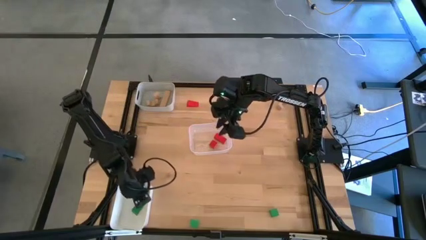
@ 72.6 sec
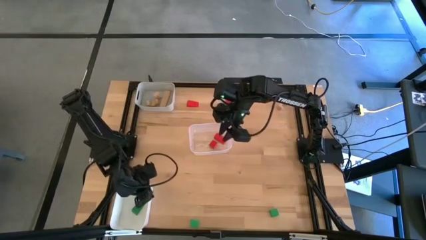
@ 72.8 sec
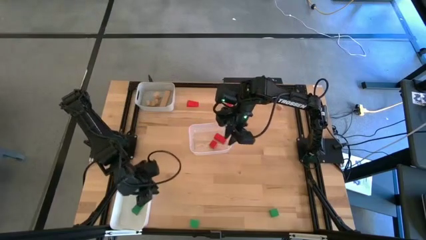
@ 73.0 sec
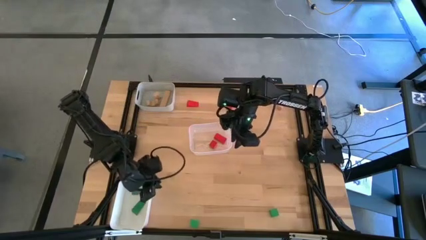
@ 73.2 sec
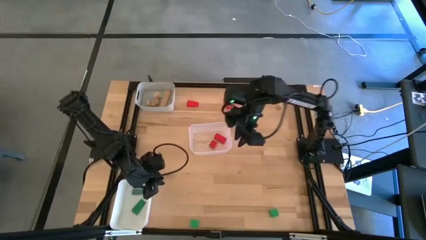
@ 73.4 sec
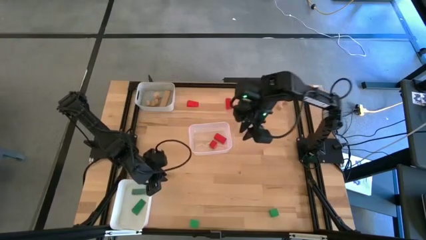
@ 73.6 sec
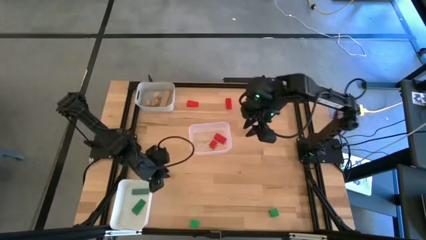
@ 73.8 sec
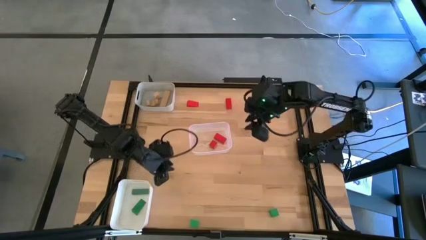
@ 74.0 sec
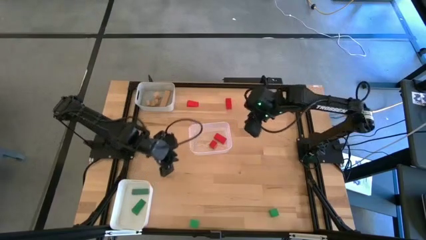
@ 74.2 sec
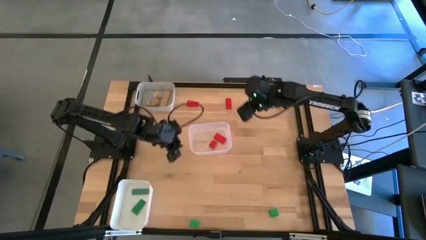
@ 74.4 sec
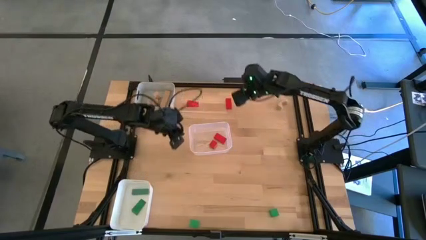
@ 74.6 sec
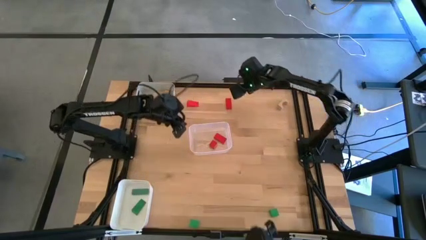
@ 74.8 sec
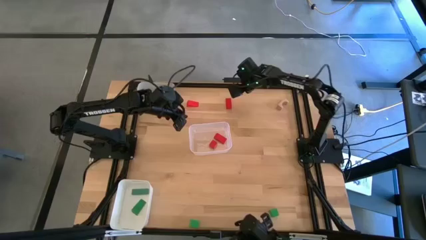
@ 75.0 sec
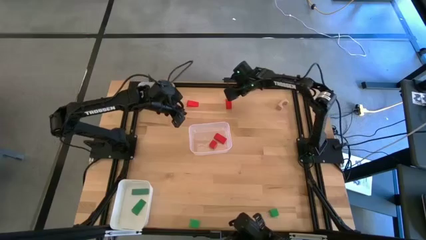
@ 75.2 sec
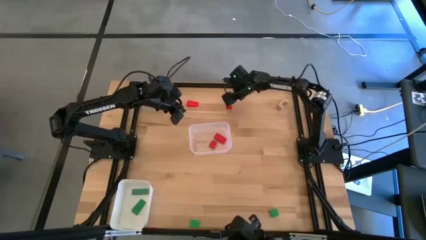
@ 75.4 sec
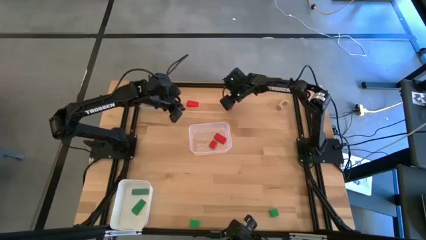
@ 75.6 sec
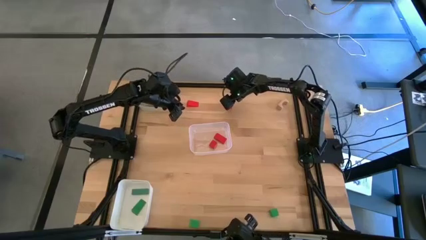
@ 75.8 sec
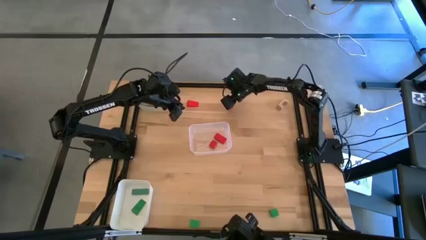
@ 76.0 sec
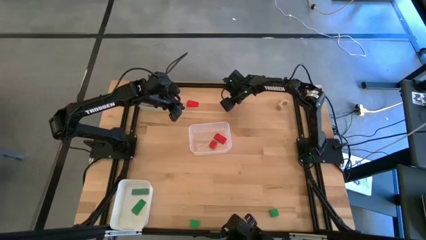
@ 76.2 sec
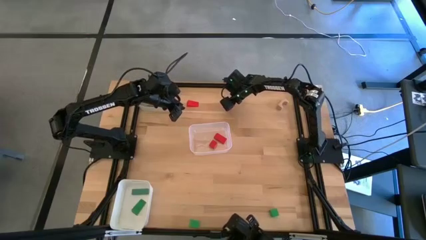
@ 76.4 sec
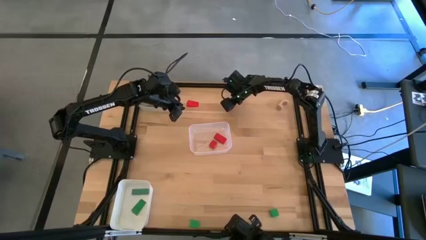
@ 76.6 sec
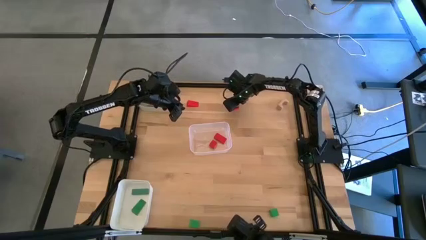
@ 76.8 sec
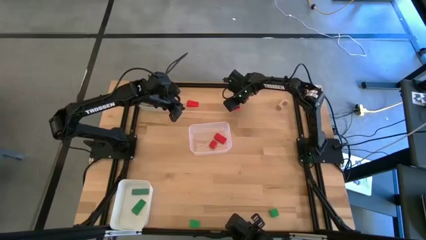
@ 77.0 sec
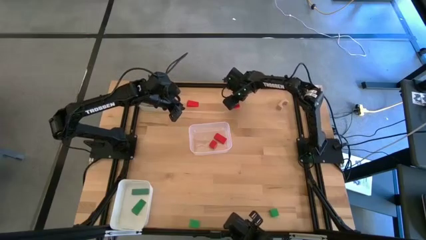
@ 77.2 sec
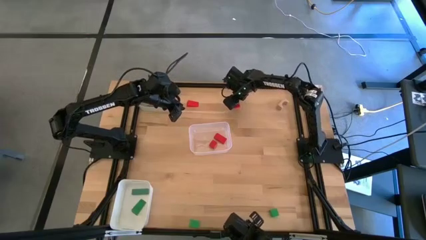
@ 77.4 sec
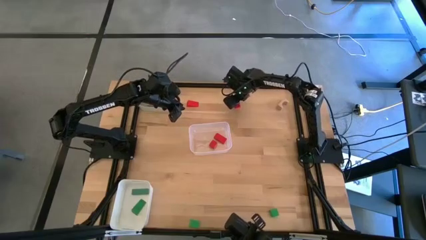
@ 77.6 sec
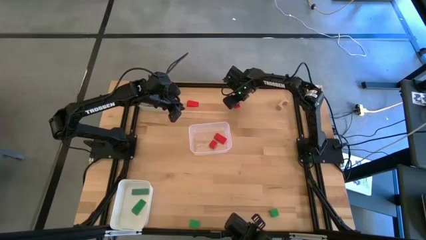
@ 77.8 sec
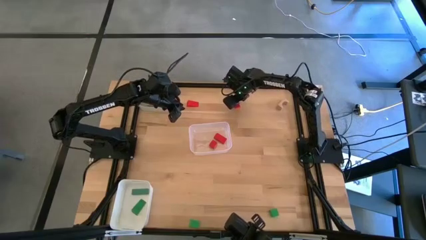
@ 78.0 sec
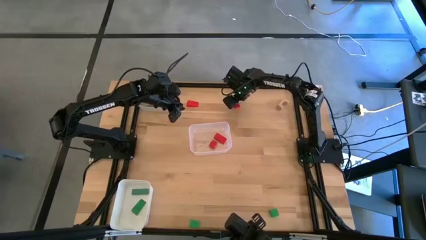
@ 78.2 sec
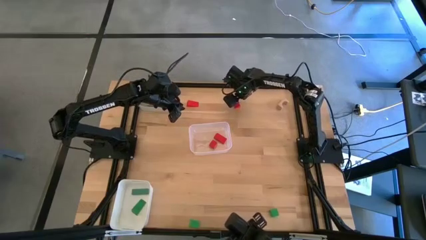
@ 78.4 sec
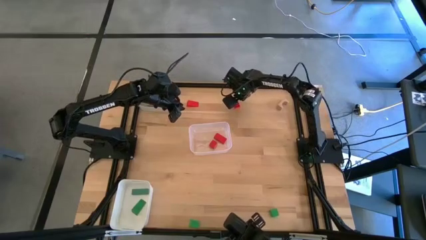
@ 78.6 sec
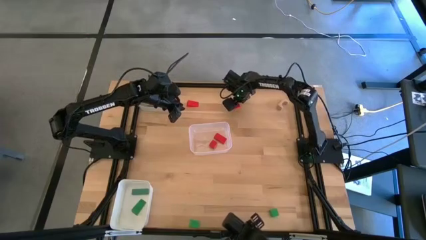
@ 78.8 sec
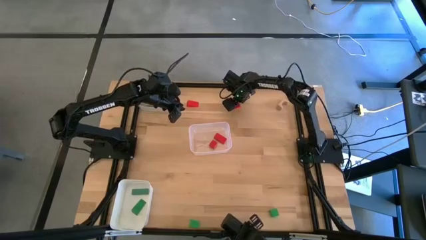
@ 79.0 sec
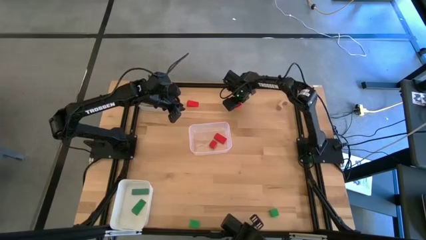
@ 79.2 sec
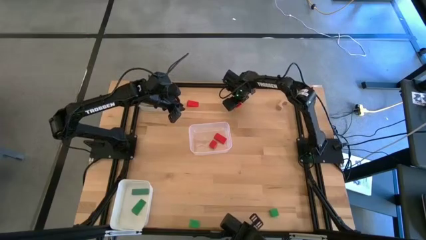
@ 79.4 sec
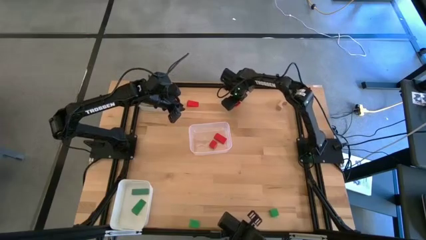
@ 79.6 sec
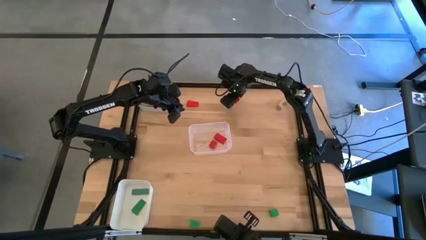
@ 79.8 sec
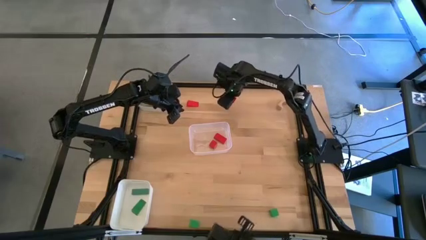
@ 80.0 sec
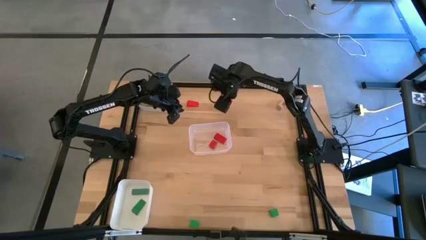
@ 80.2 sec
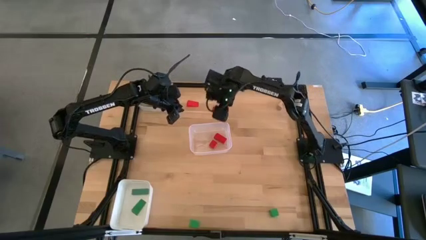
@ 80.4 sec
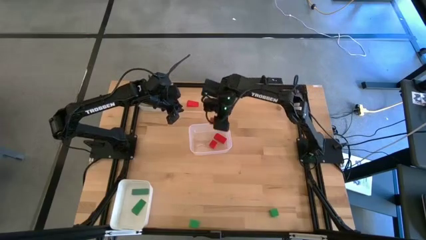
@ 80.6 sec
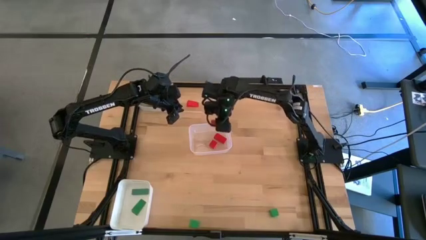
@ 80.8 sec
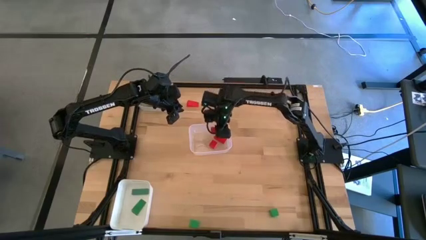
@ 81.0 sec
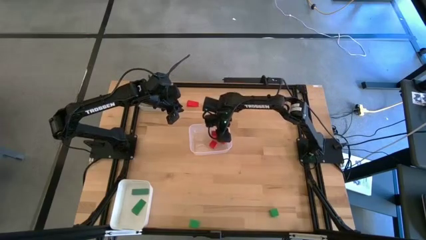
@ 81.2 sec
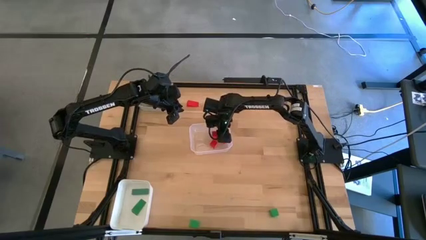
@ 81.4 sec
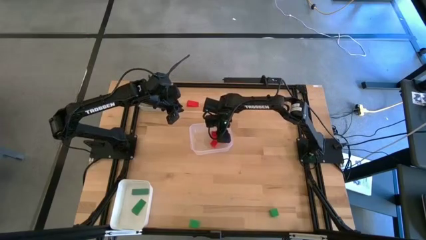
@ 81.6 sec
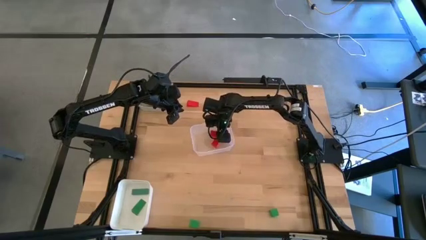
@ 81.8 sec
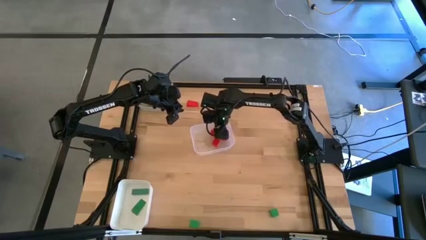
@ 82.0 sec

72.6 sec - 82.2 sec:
Task: Sort & place blocks by color
Put the red block into the transparent bin

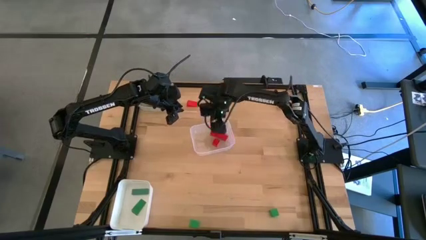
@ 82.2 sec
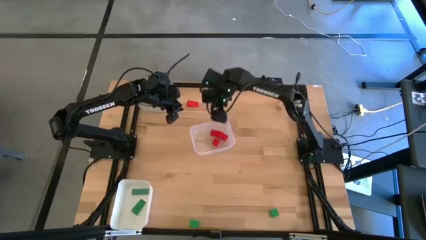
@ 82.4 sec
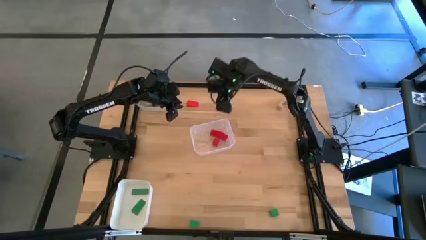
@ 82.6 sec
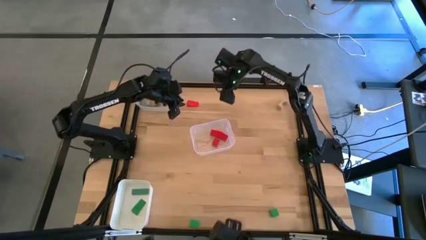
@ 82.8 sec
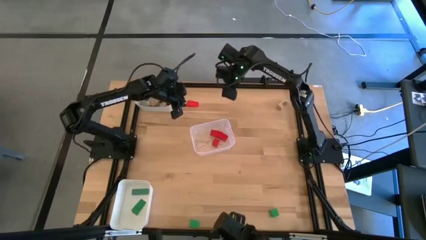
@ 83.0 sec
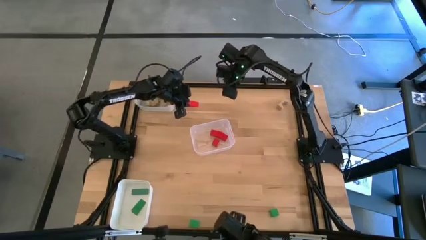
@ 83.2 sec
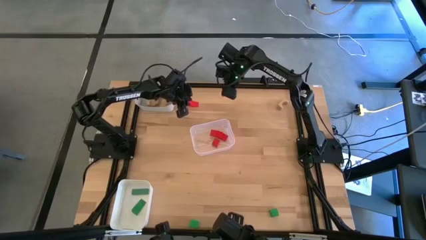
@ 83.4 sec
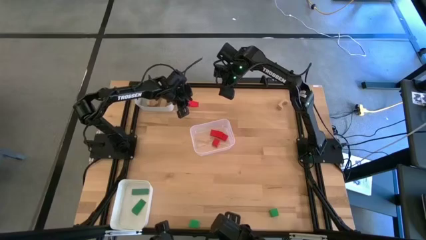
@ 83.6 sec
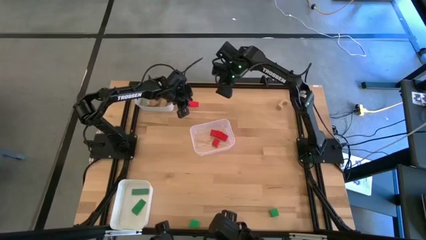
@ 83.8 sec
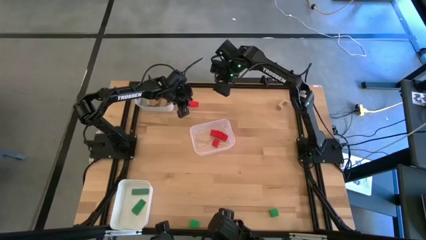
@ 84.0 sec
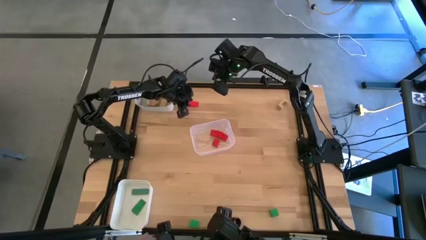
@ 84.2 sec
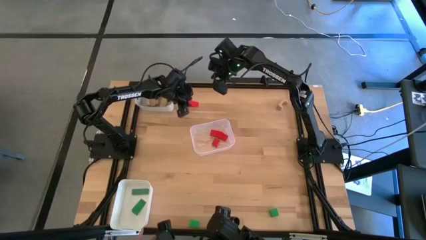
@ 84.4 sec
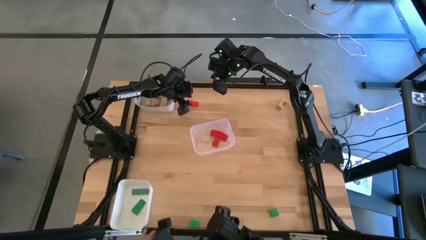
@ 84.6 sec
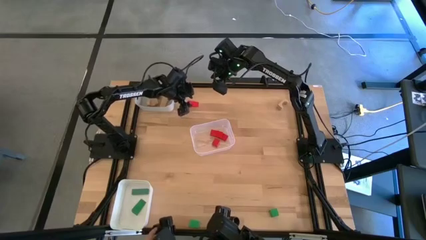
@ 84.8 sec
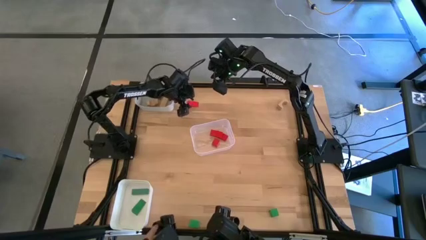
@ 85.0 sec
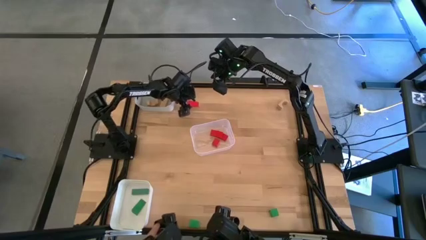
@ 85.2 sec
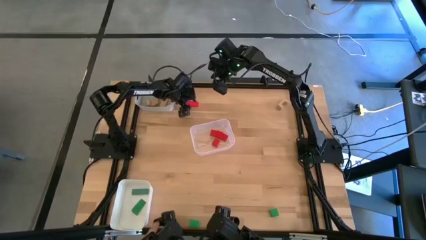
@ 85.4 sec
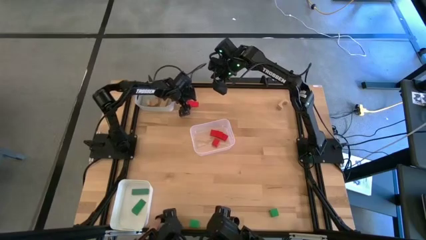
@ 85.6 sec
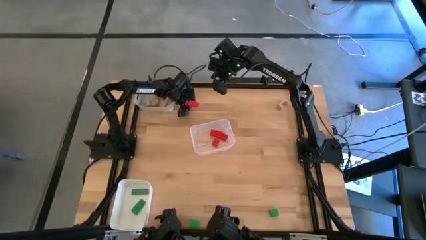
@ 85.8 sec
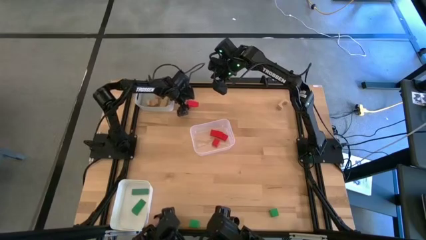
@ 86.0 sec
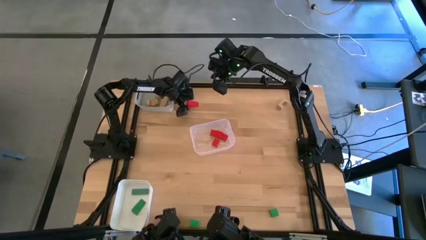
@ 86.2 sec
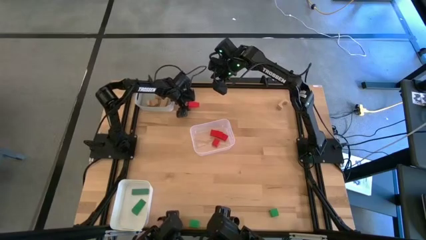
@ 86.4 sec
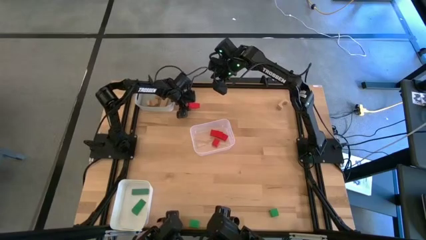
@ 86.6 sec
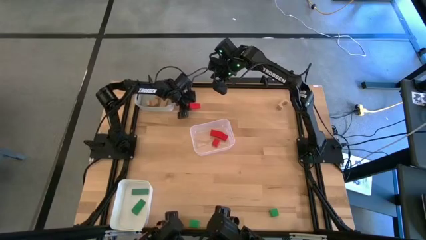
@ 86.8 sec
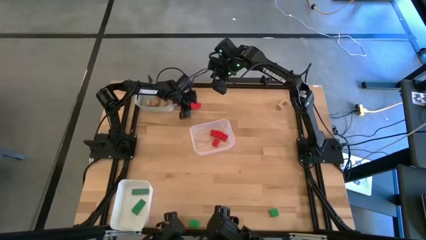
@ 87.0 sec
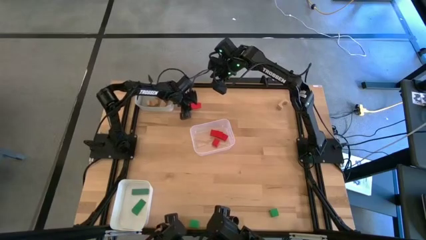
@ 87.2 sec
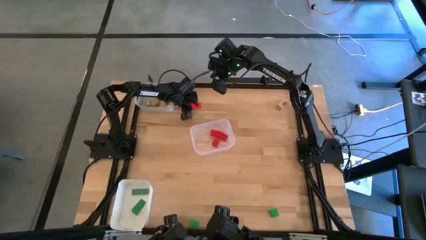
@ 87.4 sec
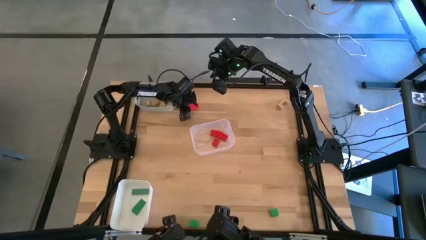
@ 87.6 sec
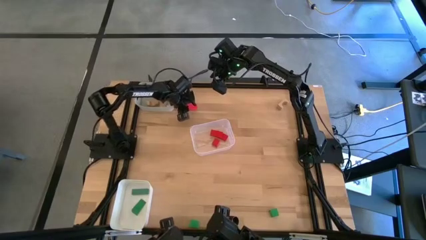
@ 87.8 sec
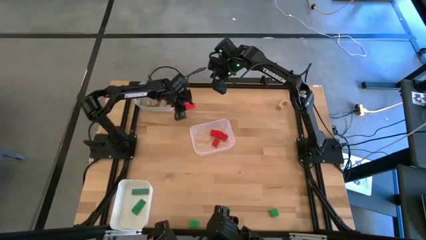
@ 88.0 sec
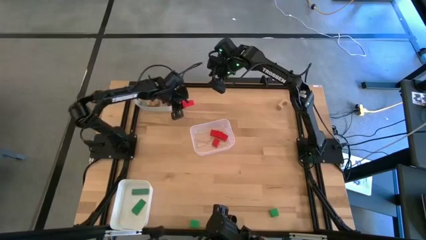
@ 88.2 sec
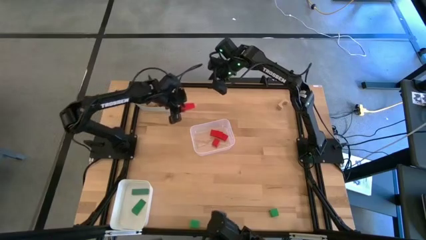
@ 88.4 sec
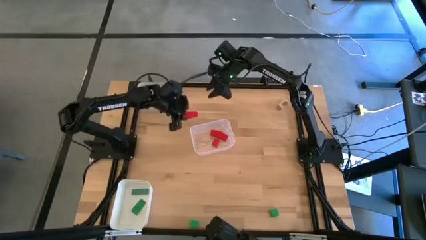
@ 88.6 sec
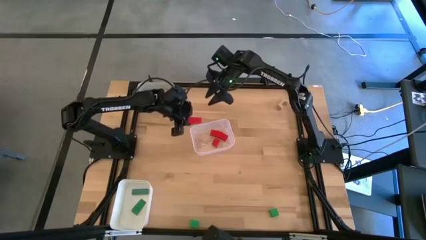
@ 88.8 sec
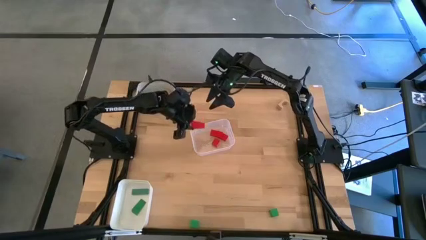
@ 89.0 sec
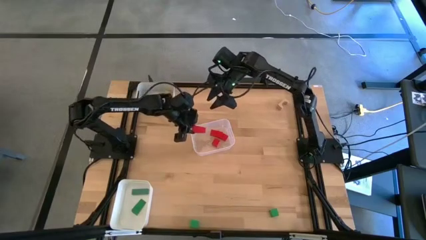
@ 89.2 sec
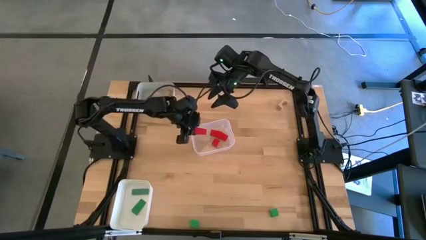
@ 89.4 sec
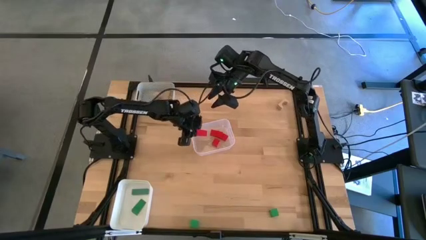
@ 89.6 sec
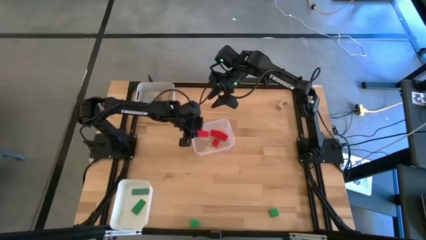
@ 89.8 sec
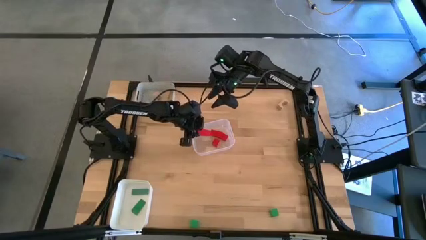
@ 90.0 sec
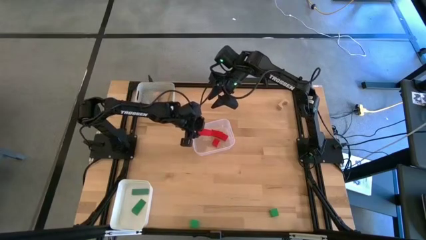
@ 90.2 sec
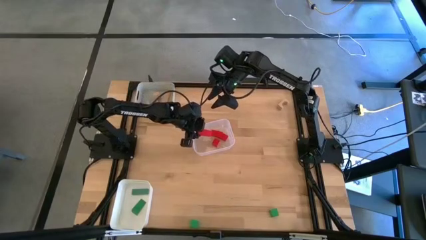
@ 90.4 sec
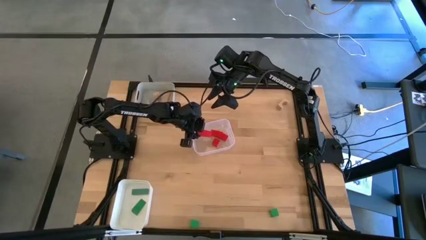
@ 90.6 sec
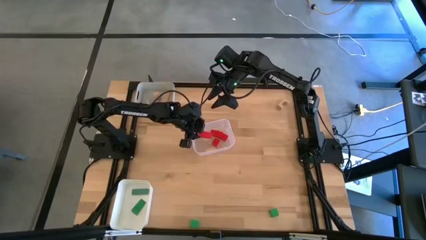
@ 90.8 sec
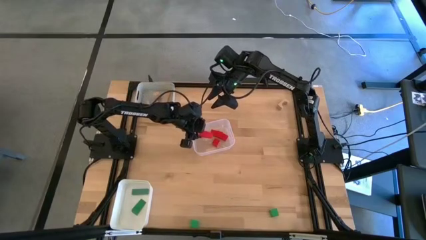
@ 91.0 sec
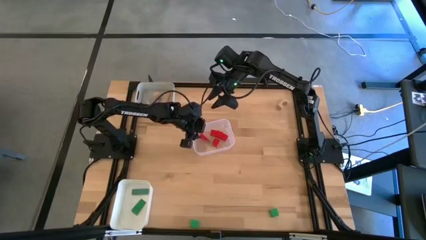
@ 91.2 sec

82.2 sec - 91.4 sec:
Put the red block into the transparent bin
